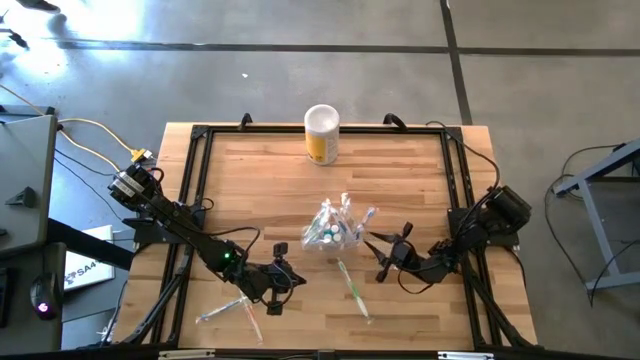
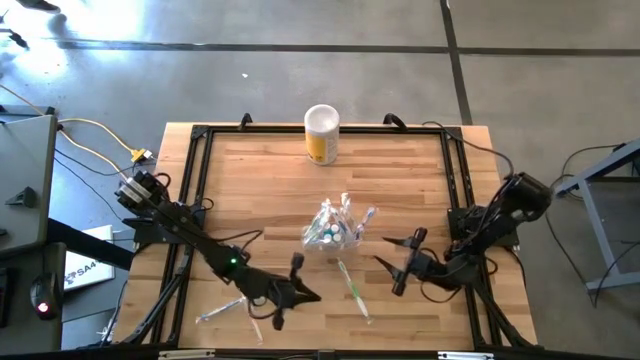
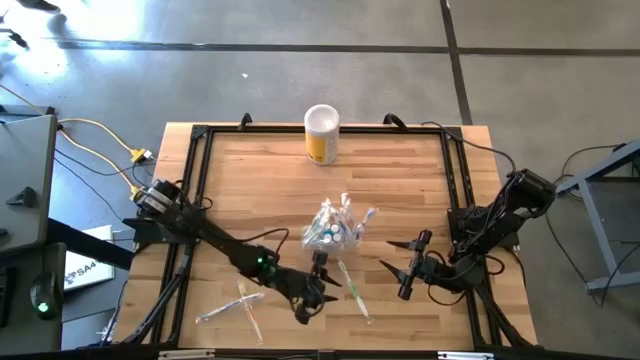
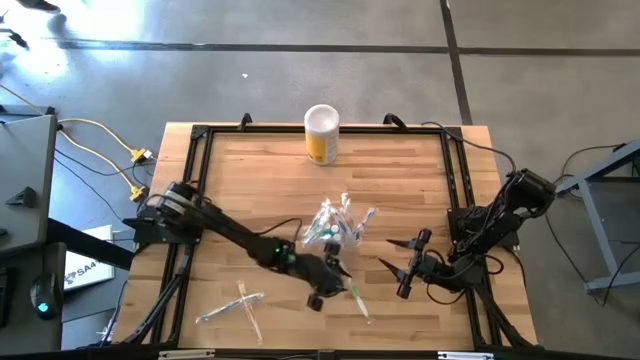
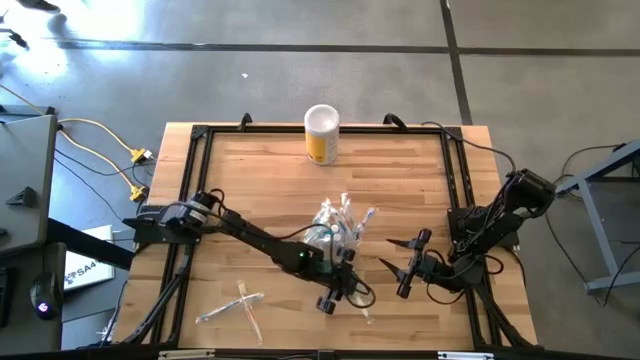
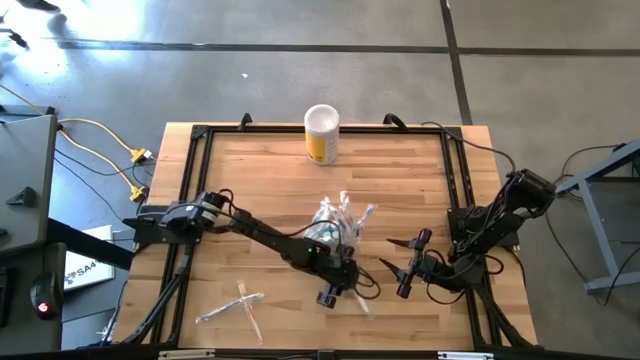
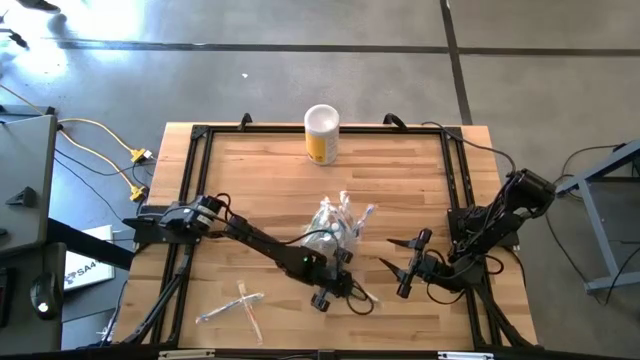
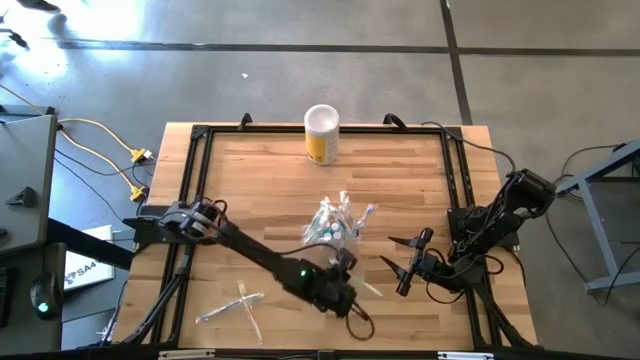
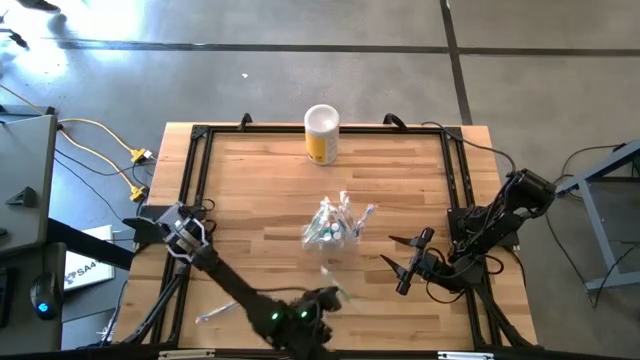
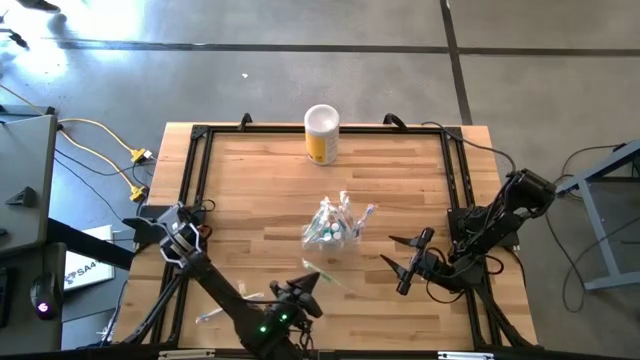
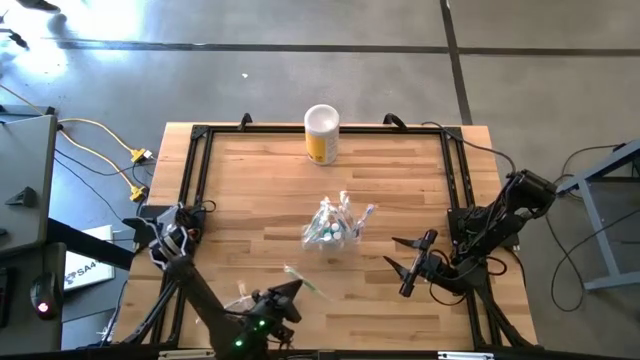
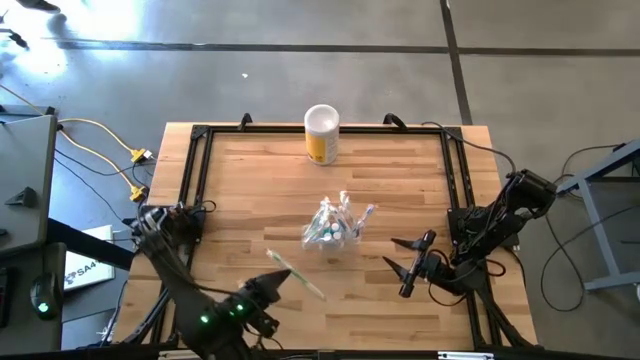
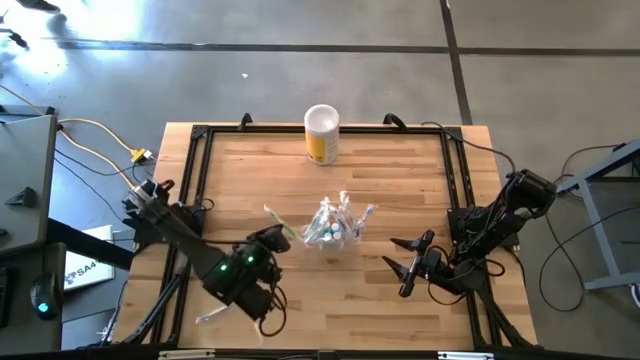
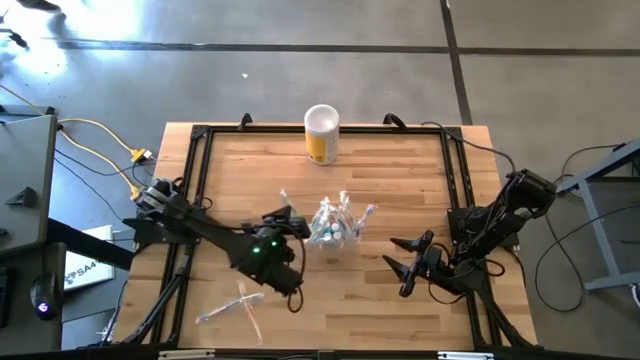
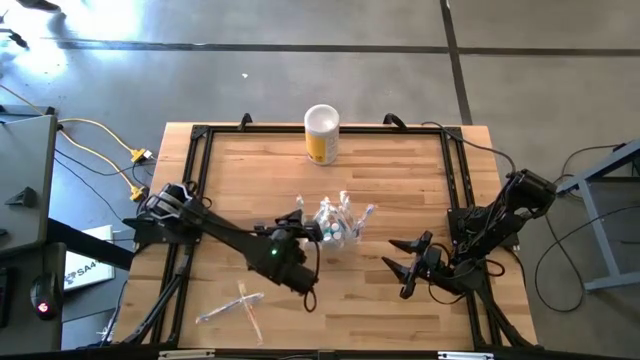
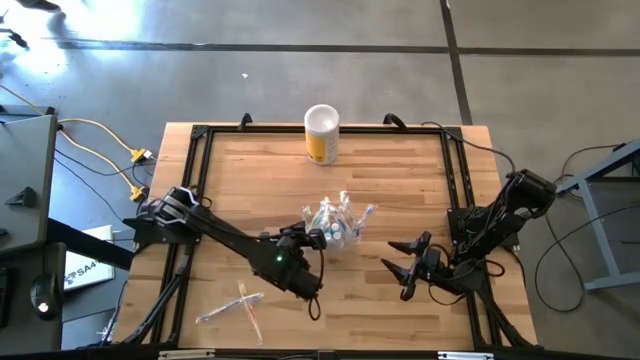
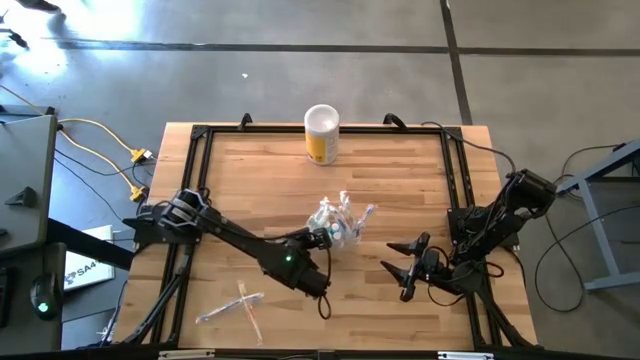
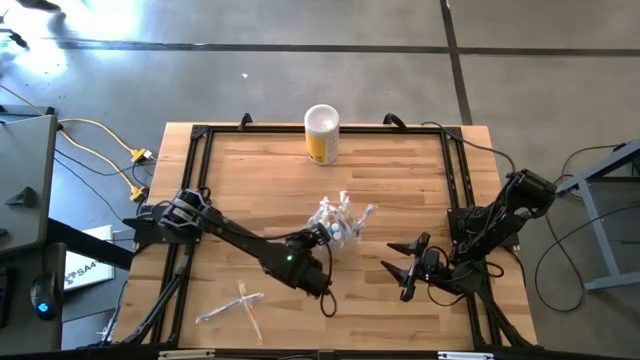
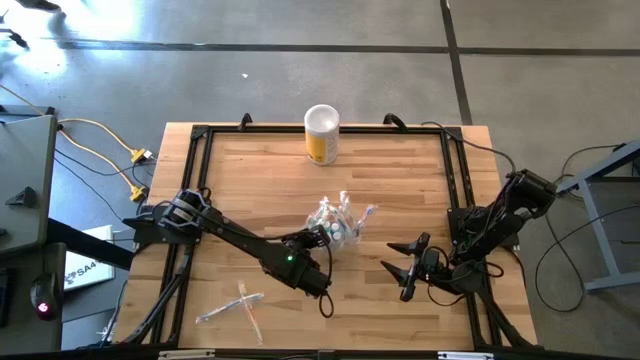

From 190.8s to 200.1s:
Task: Pick & Place toothbrushing station
Put the green toothbrush into the left part of the transparent organizer

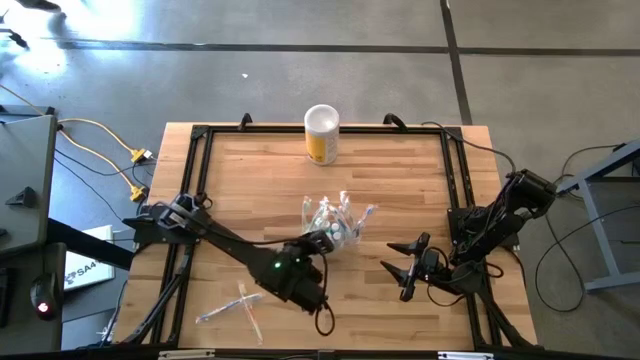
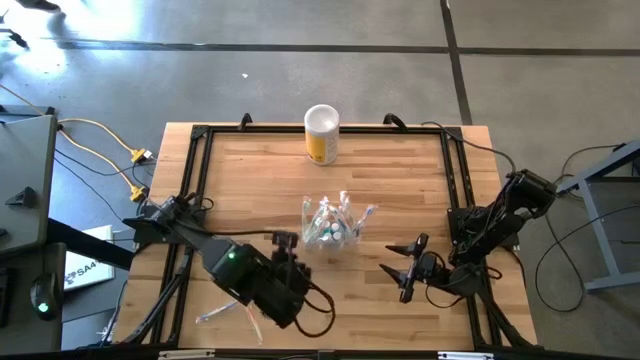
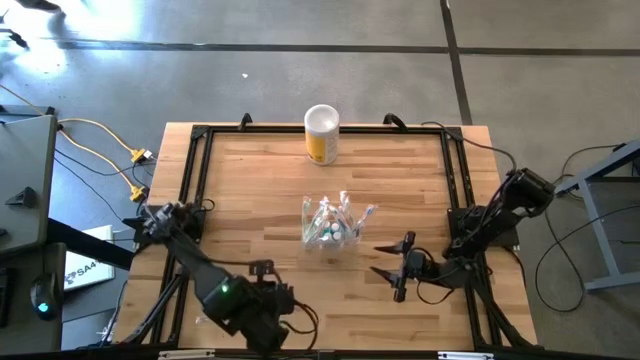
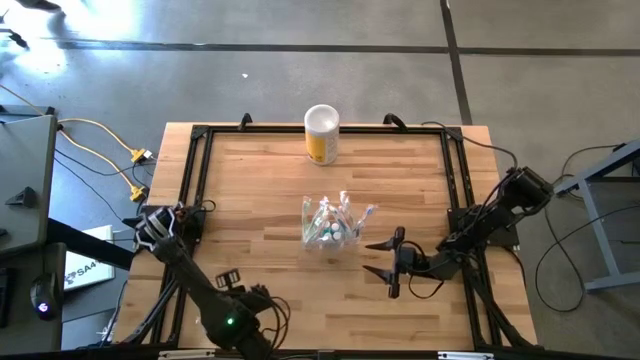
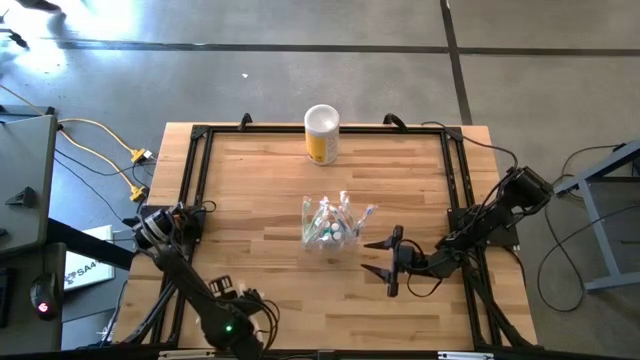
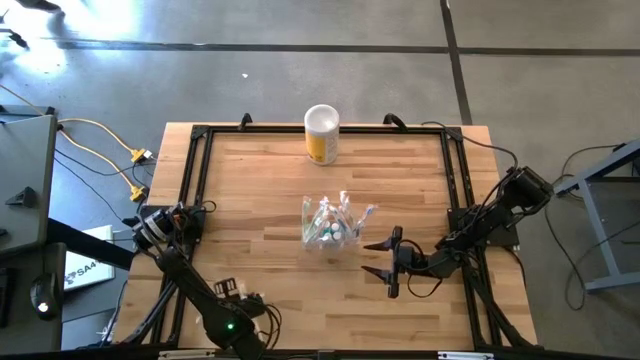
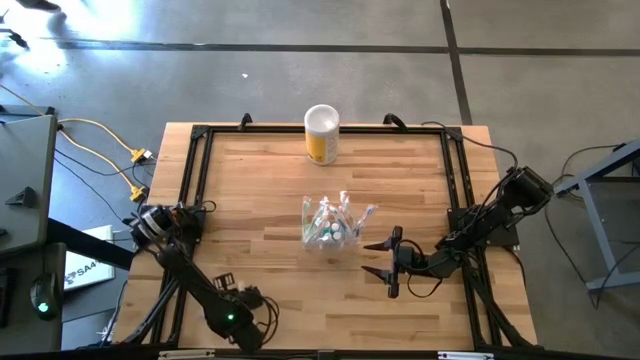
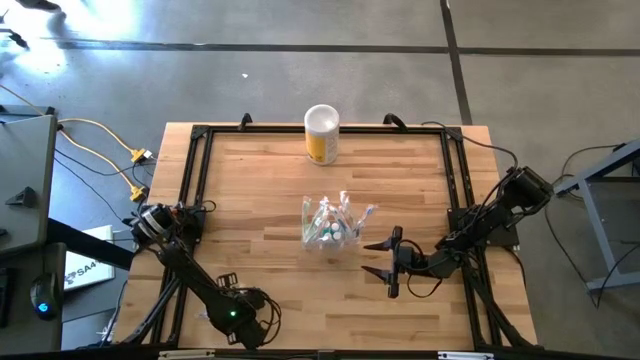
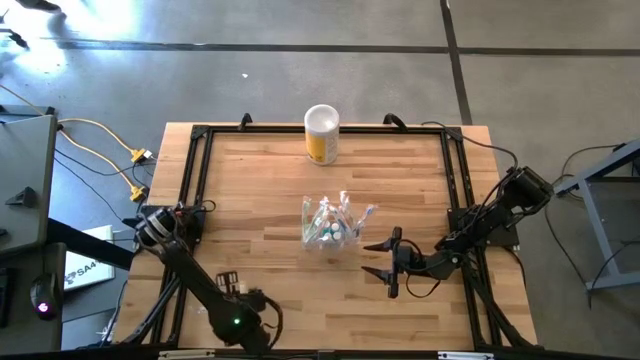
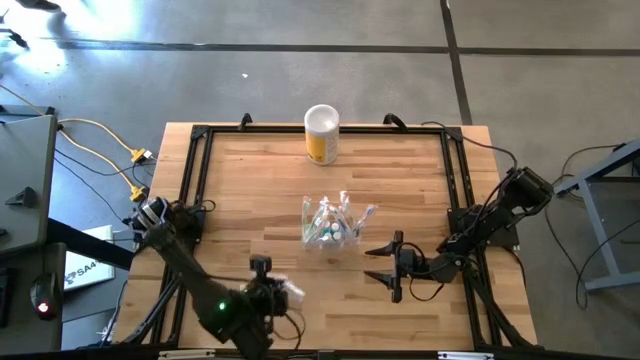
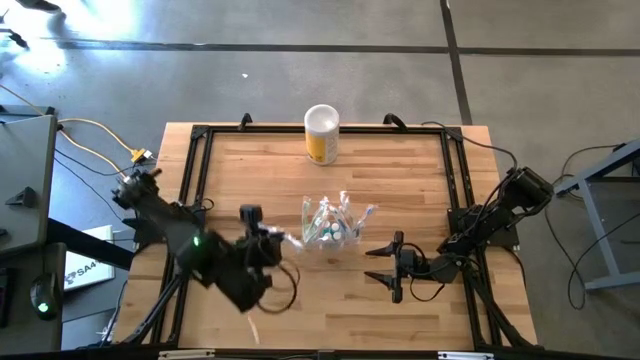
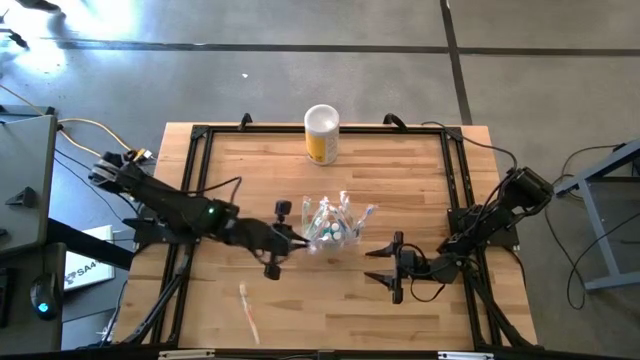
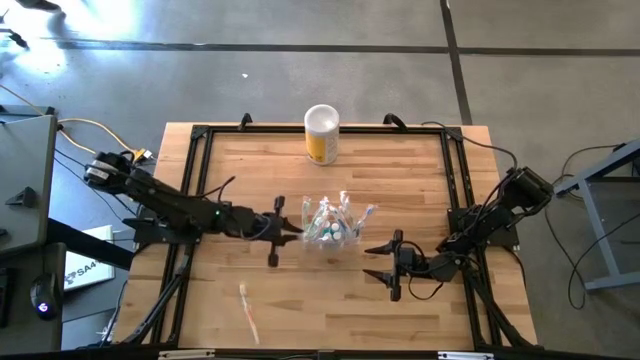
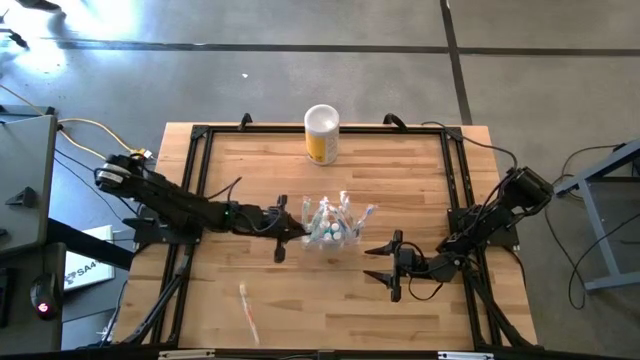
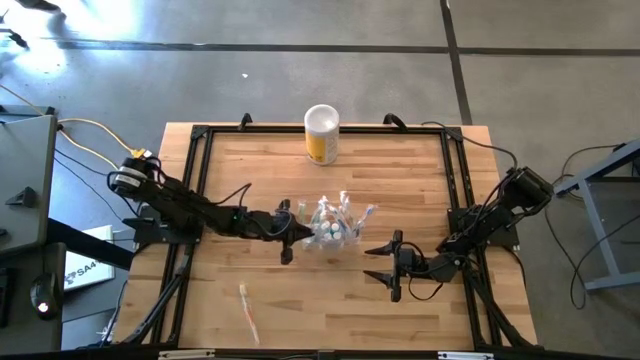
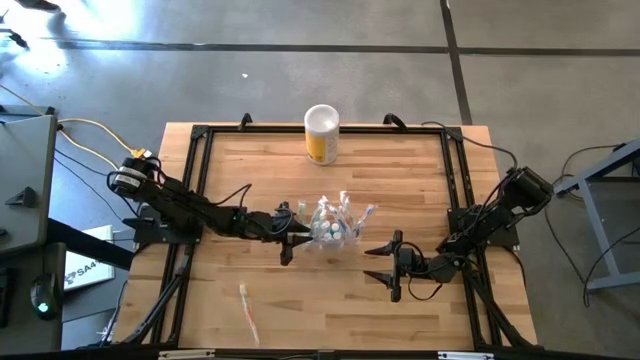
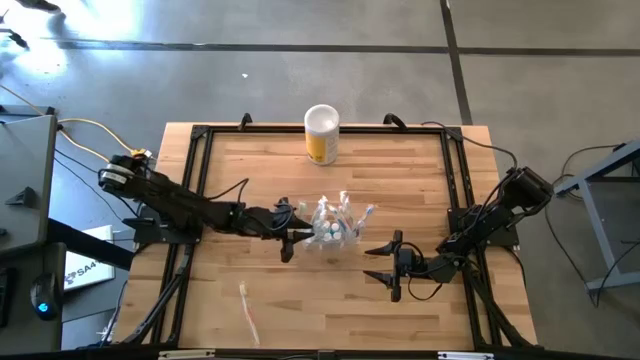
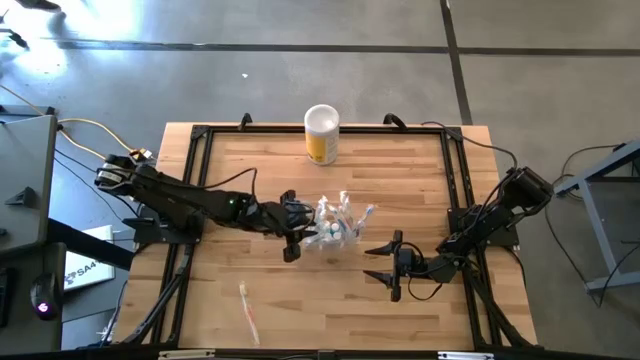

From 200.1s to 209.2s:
Put the blue toothbrush into the left part of the transparent organizer

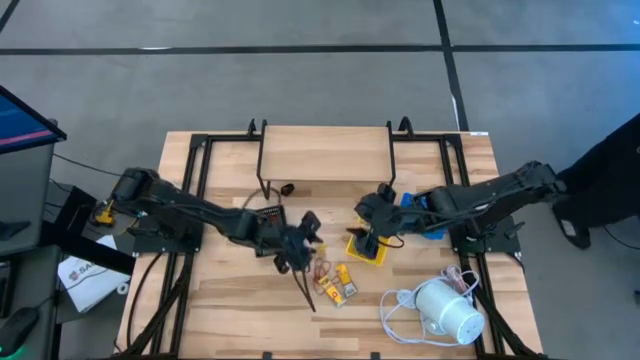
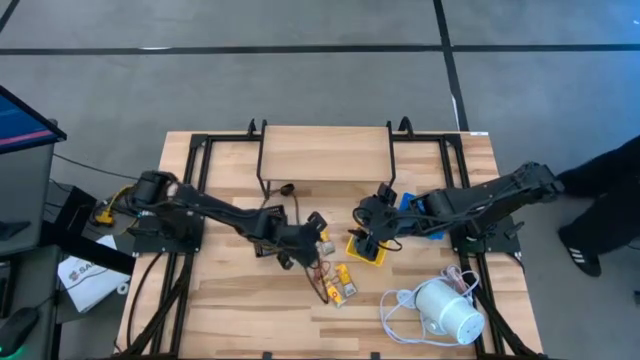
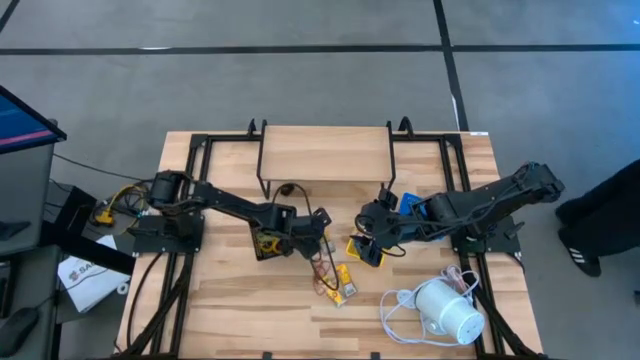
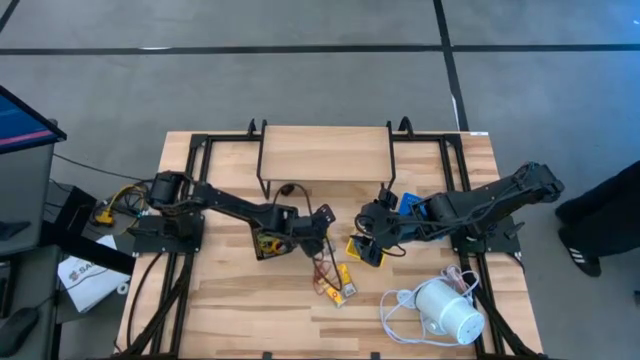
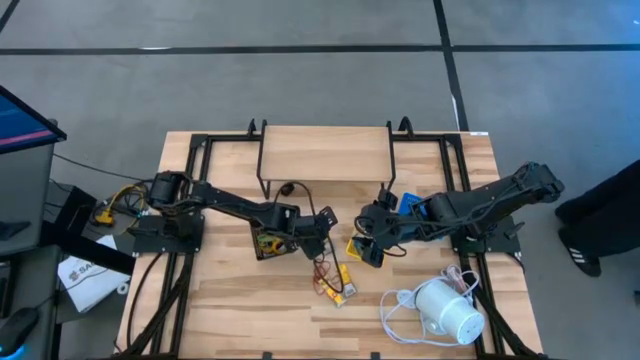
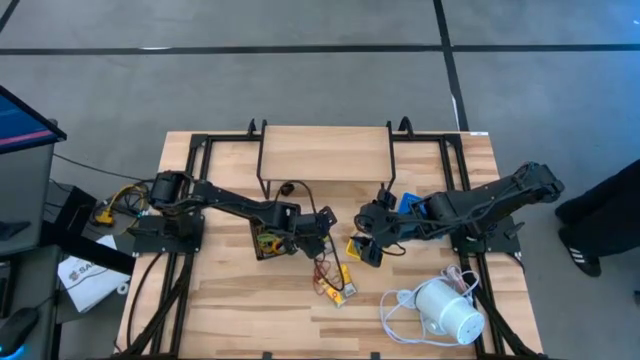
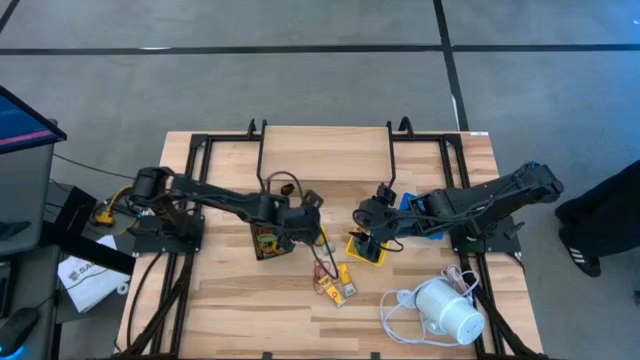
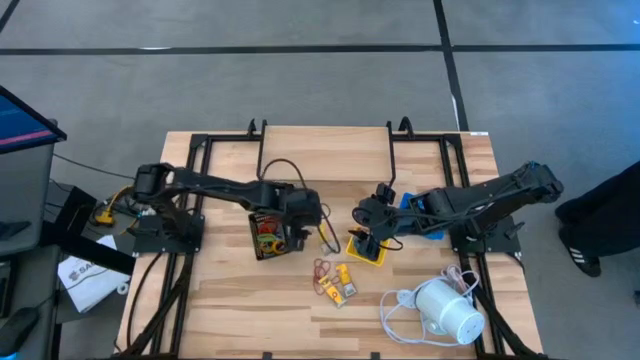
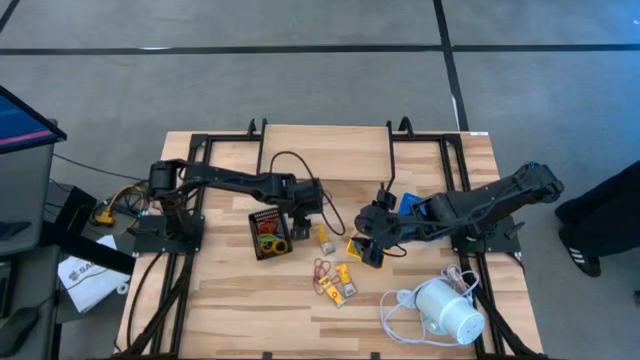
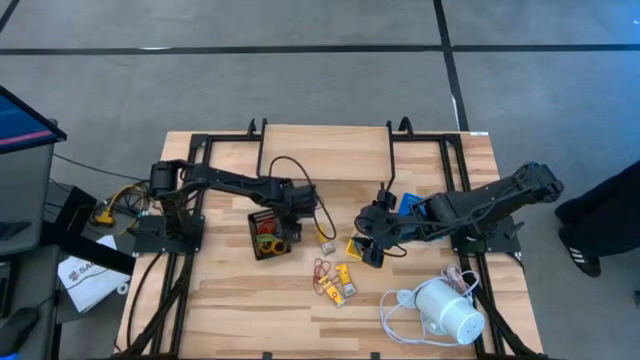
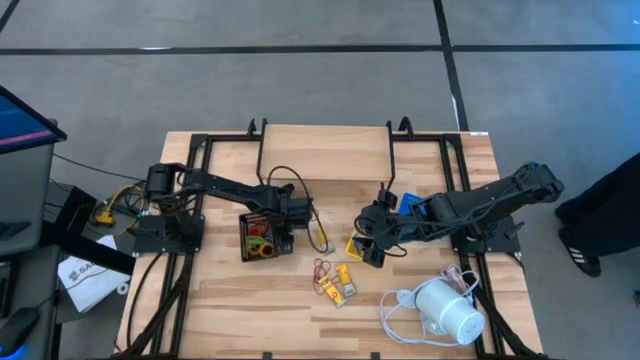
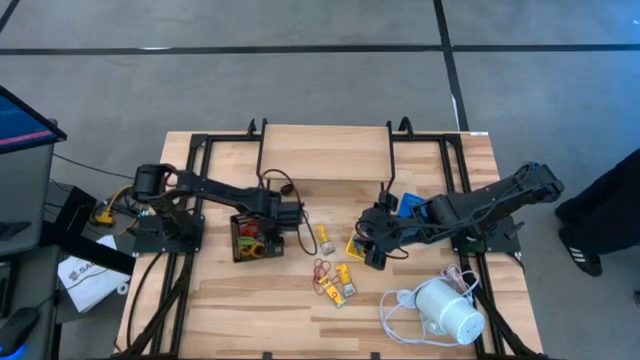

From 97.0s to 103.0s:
Task: Pick & Place Office Desk Supplies
Adjust the black bin
